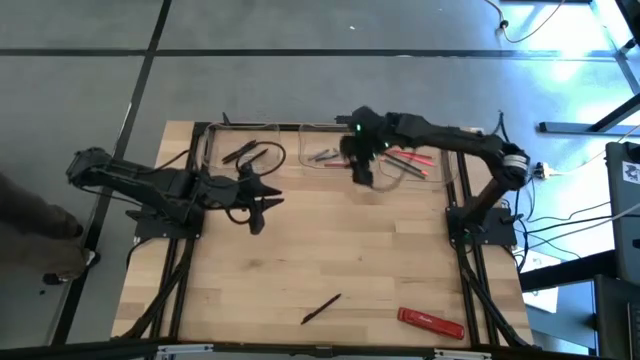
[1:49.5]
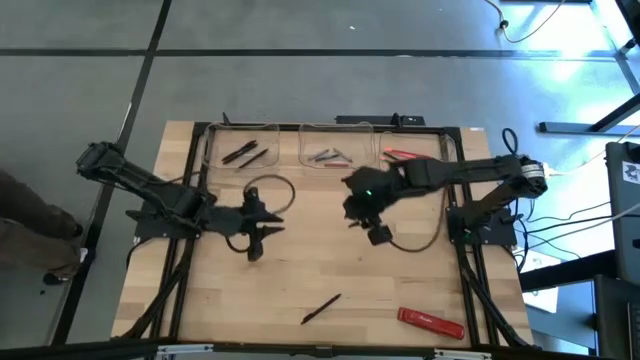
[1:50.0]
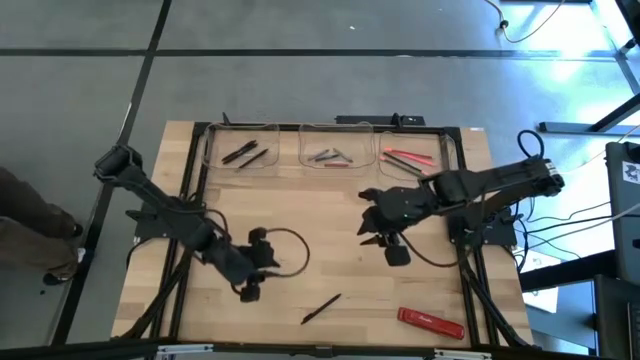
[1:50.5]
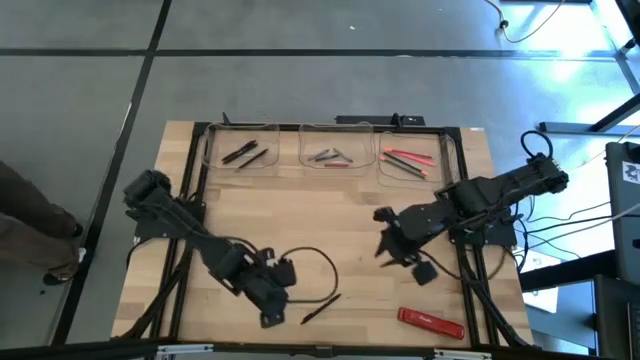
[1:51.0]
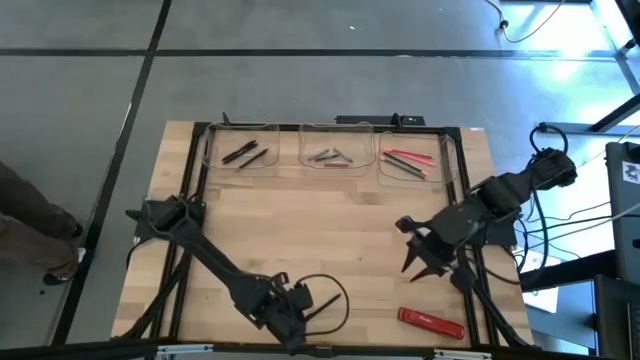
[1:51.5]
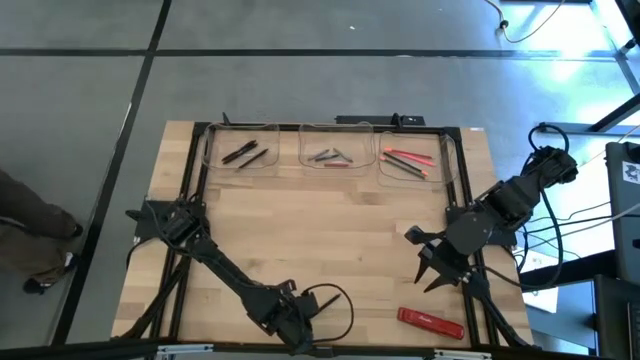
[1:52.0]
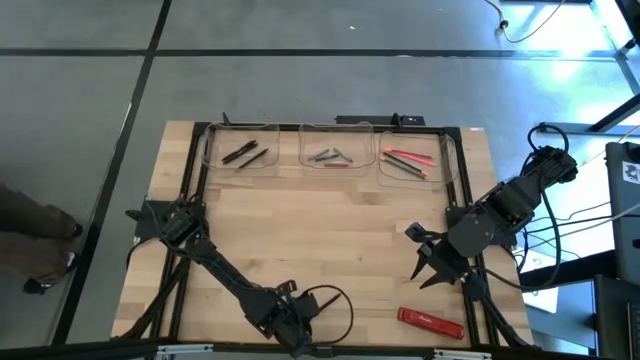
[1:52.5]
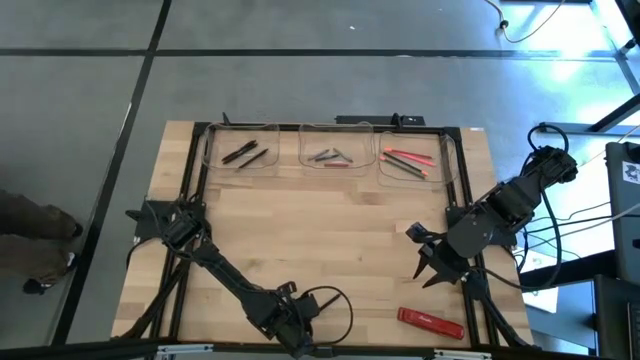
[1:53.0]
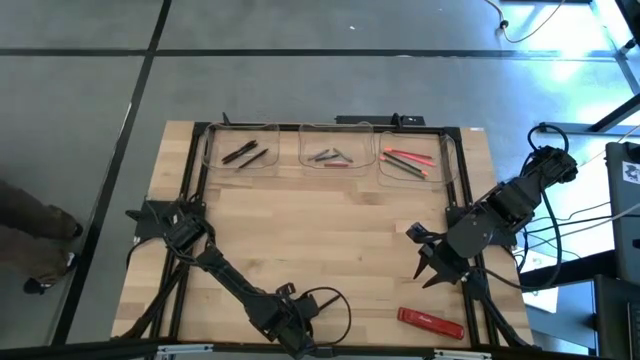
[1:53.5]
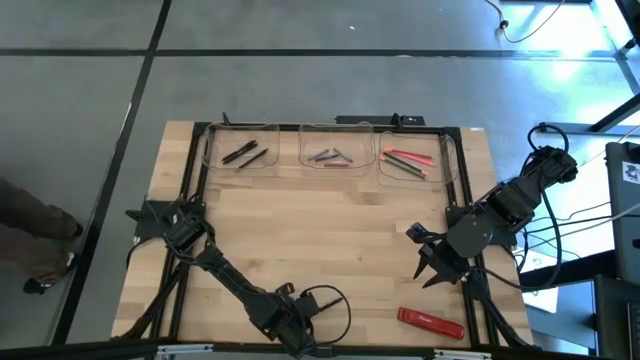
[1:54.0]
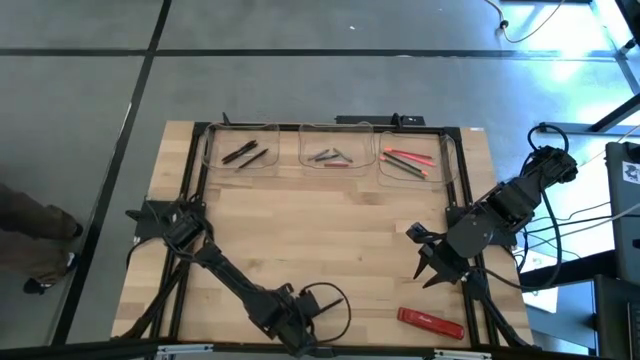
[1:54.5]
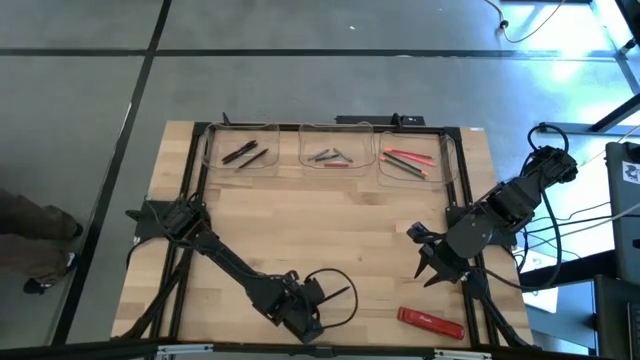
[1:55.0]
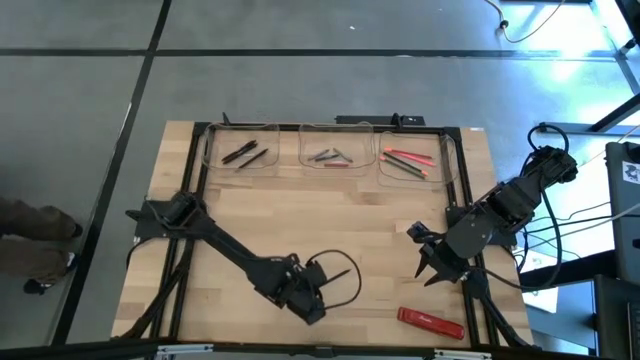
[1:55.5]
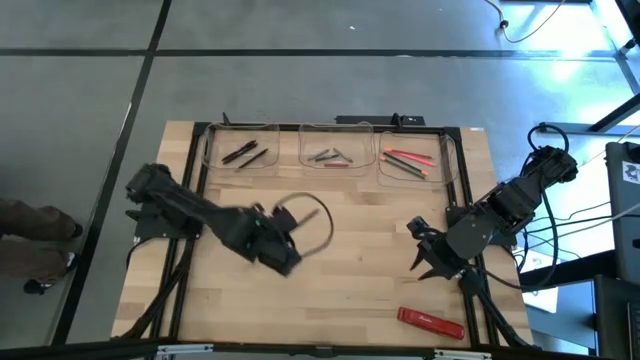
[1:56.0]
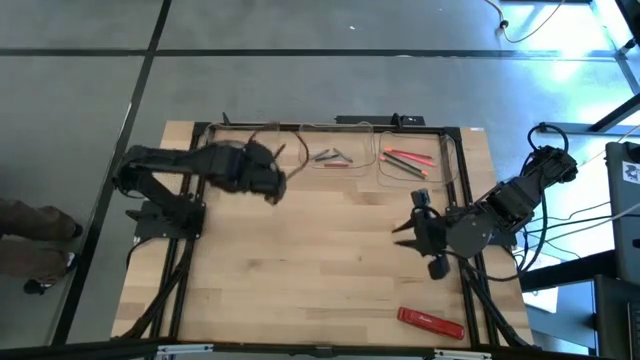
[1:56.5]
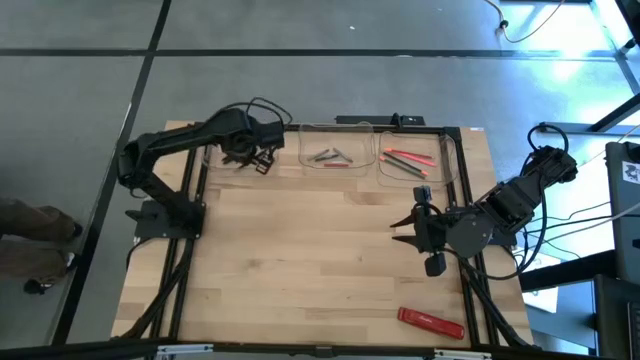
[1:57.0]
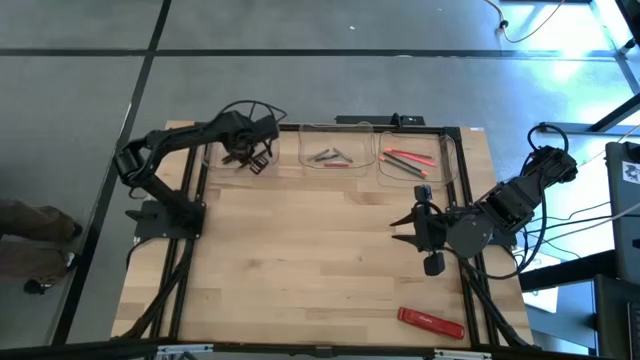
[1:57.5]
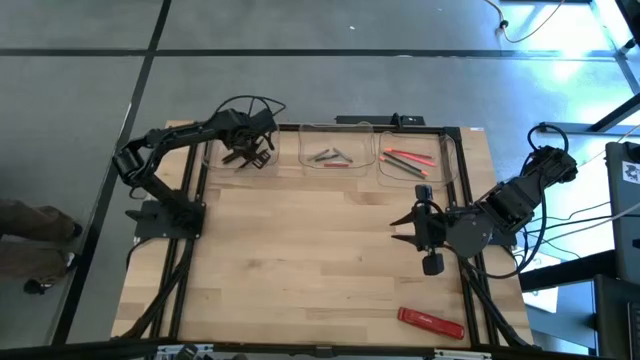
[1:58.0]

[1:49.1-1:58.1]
Task: Sort crayons/erasers/pens/pencils in bins
Put the black pen into the left transparent bin

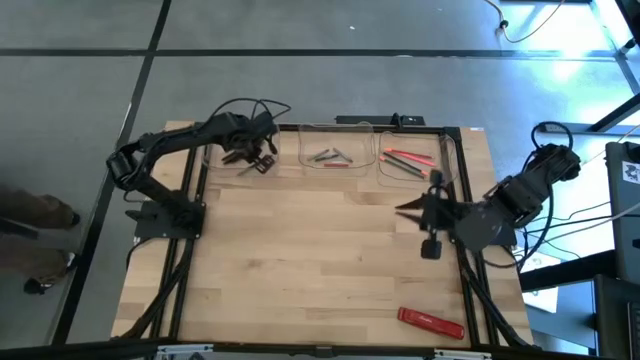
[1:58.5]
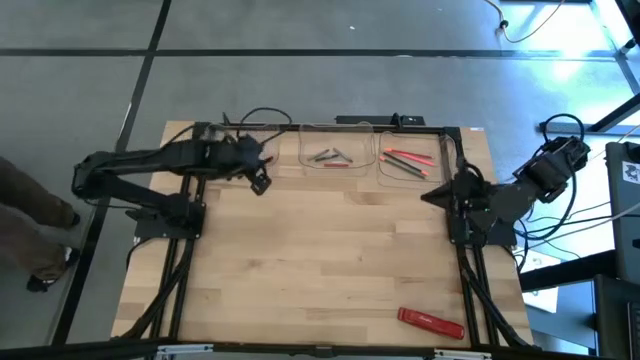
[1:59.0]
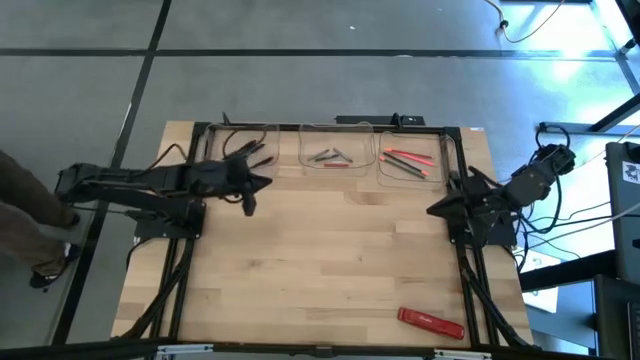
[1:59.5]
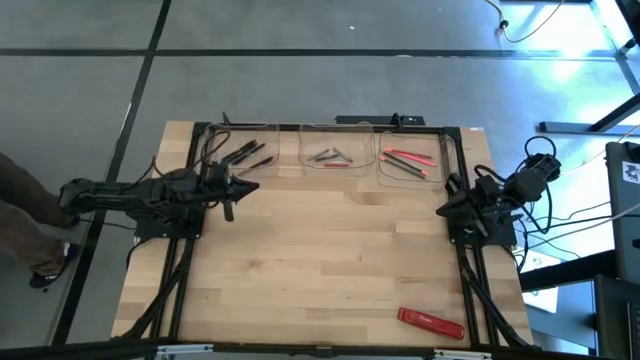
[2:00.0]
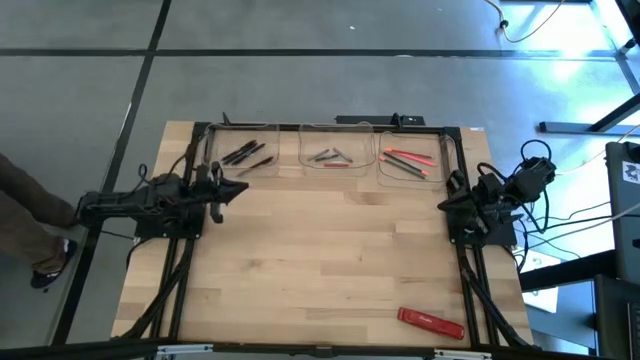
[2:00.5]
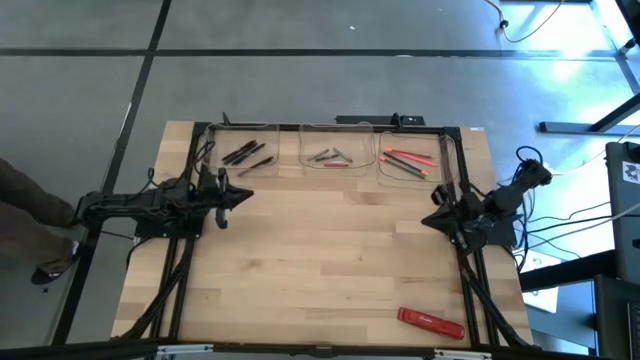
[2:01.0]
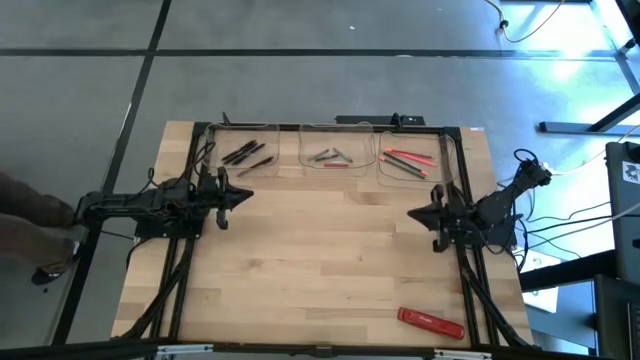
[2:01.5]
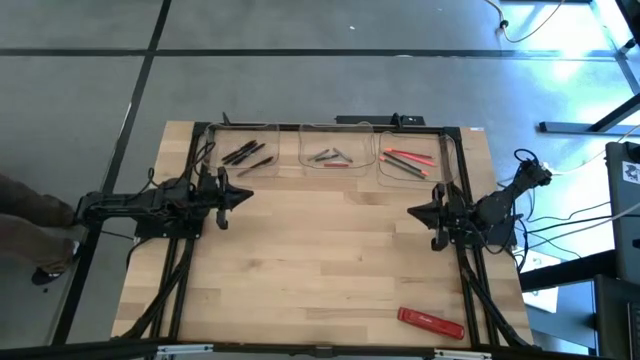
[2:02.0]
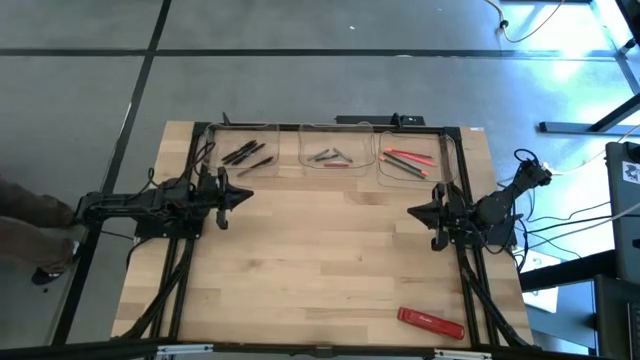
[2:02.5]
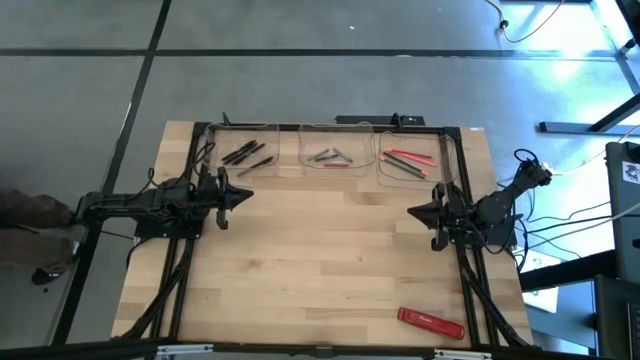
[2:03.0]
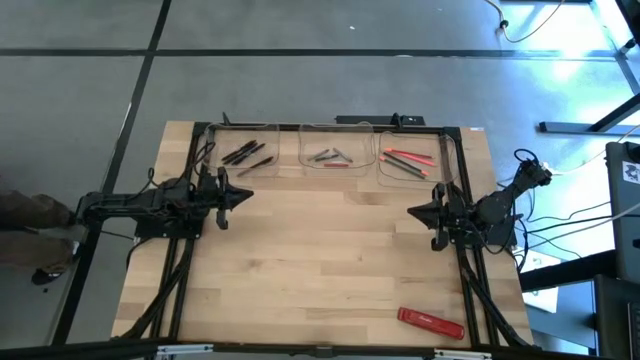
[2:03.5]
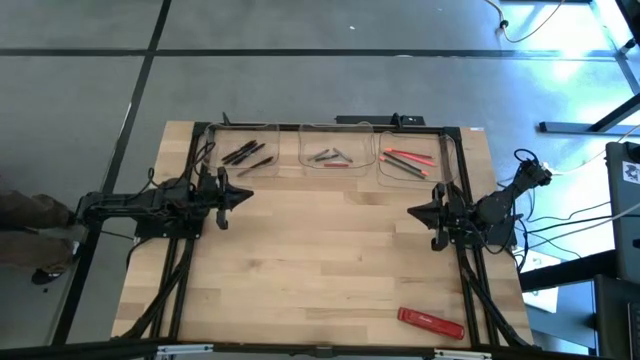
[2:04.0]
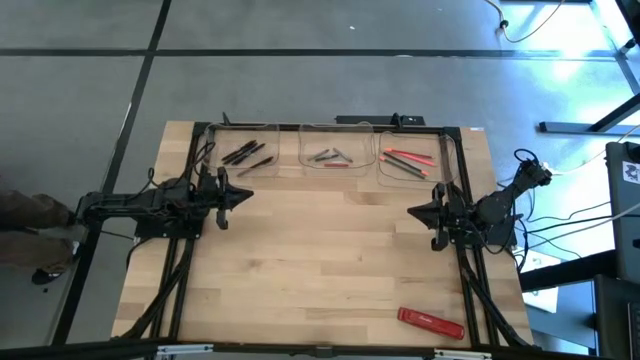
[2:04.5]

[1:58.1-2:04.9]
Return to Home Position

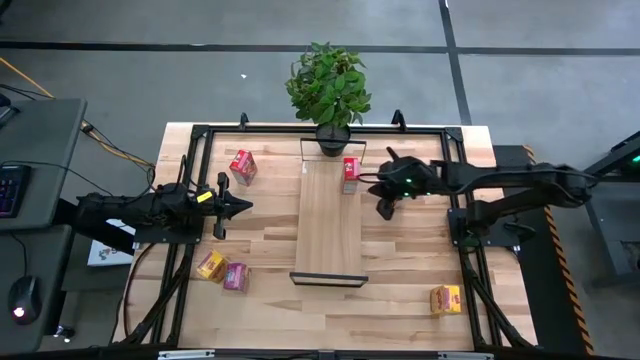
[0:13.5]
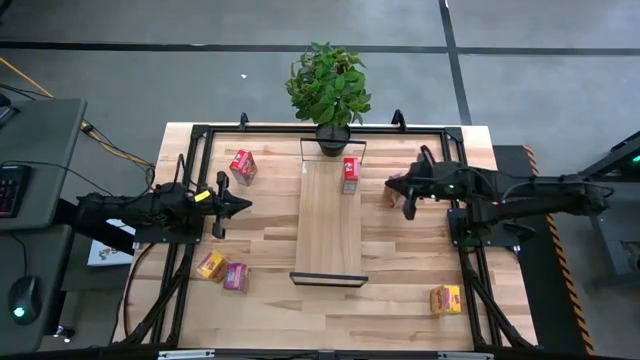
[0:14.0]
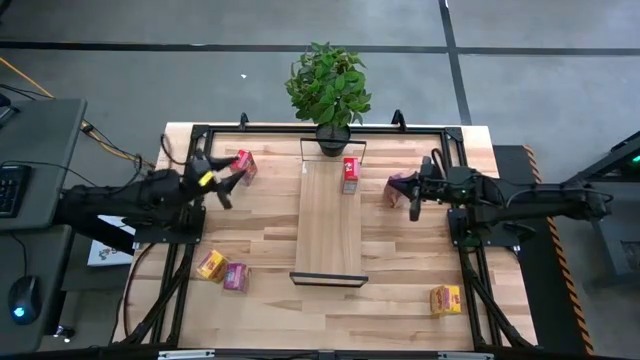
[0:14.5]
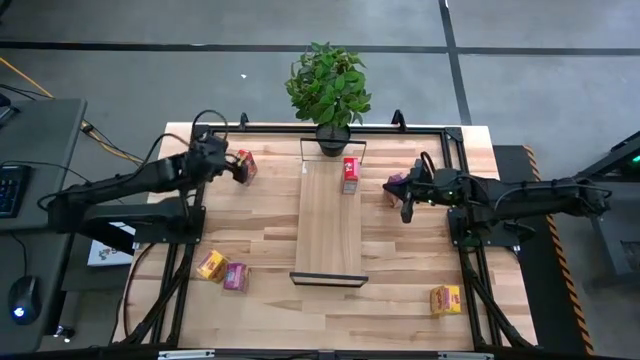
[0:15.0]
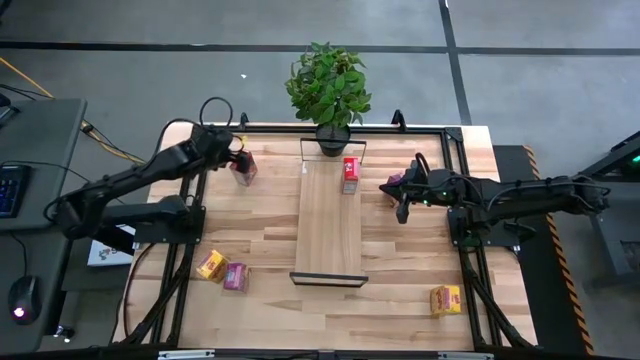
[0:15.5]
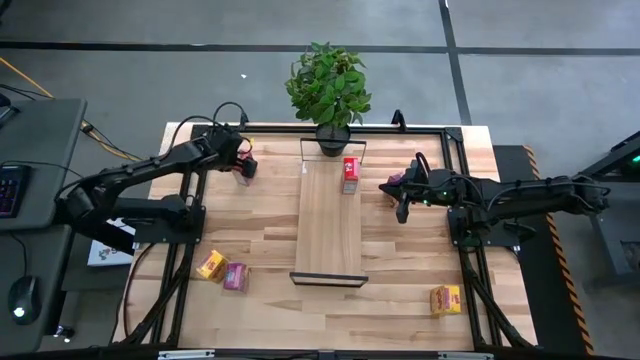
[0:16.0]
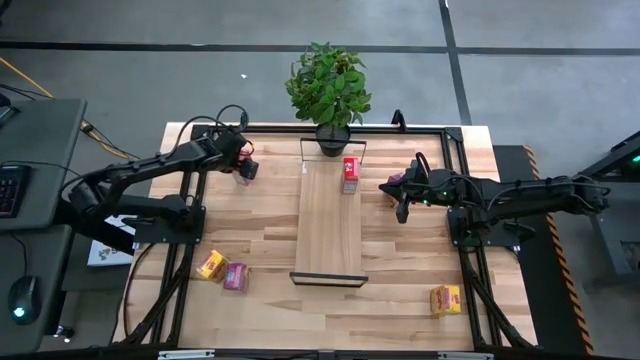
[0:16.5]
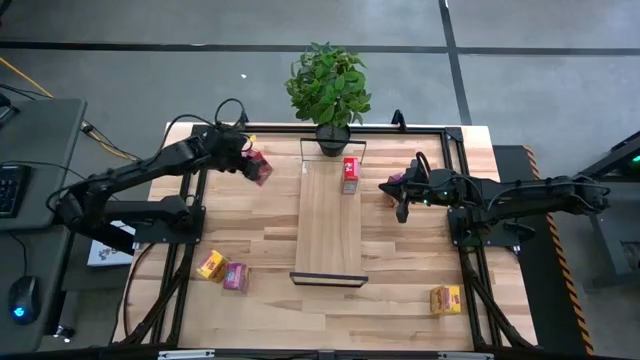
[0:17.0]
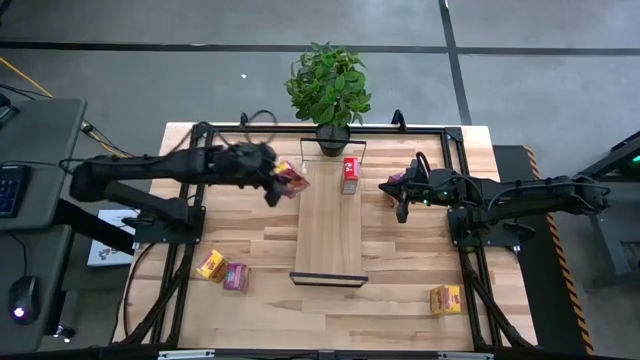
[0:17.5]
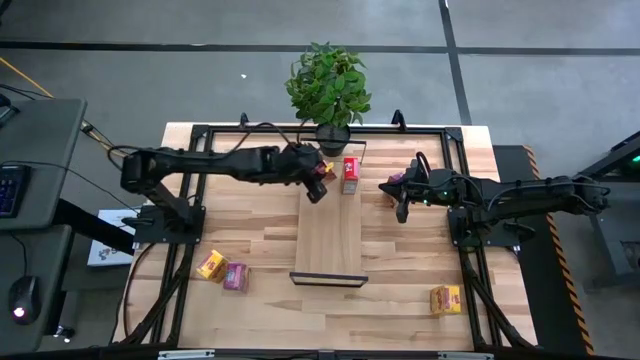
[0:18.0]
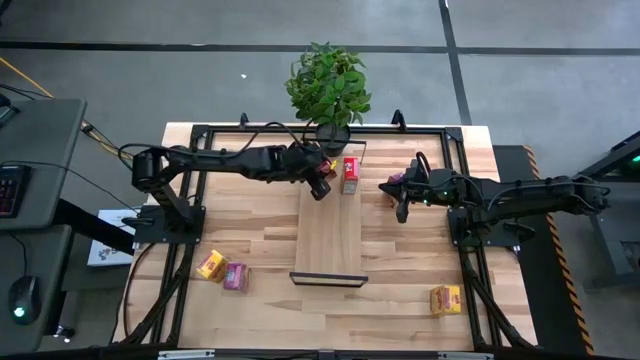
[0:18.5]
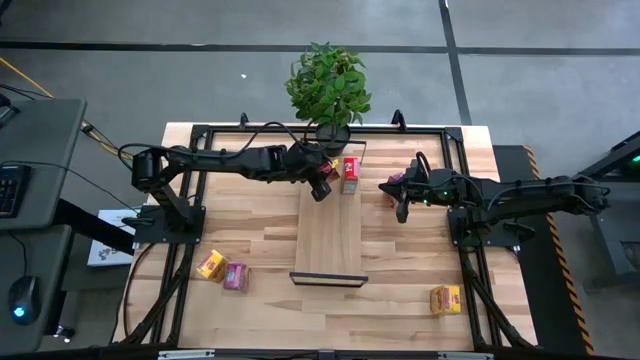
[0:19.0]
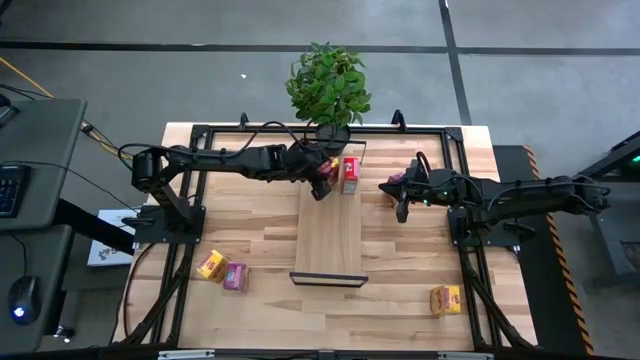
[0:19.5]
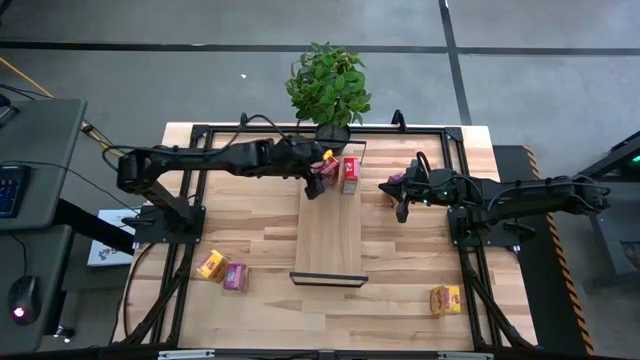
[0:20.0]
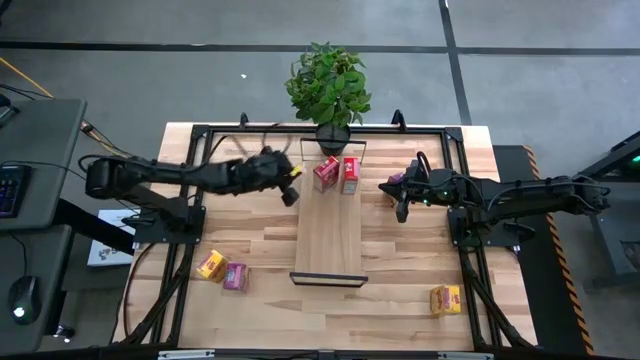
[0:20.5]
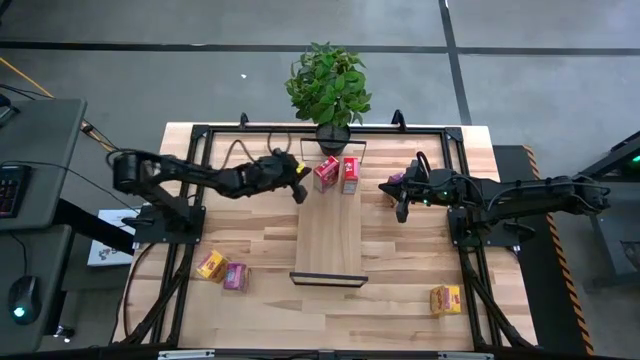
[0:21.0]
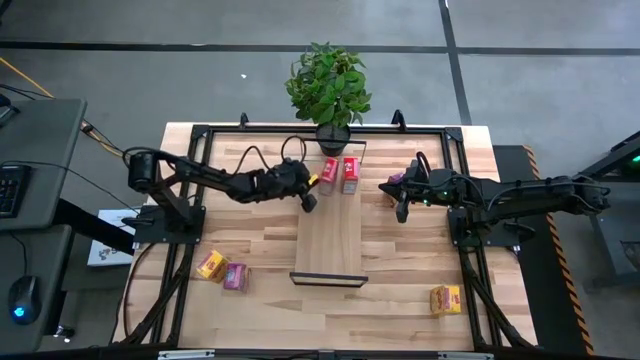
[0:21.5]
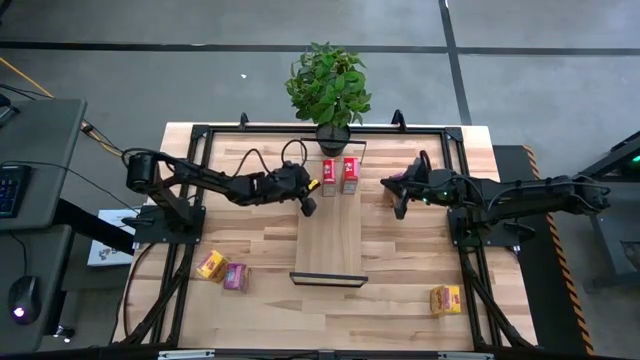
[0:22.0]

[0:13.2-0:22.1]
Task: Stack cereal on shelf
Put the red cereal box on the shelf aligned with the other red cereal box
